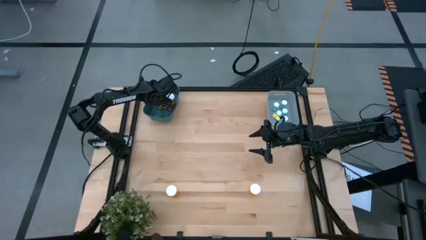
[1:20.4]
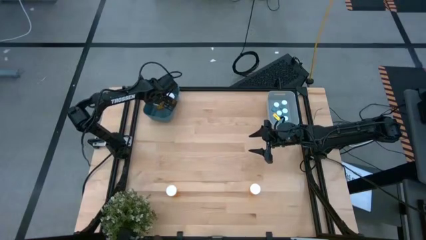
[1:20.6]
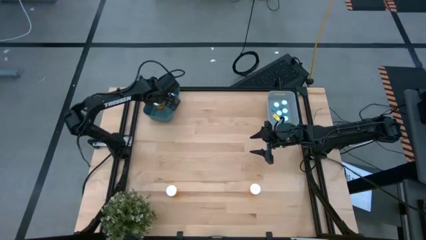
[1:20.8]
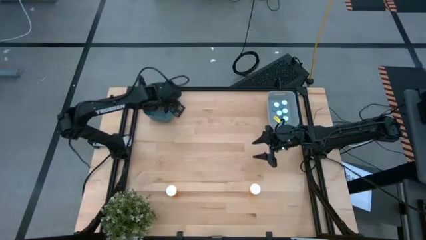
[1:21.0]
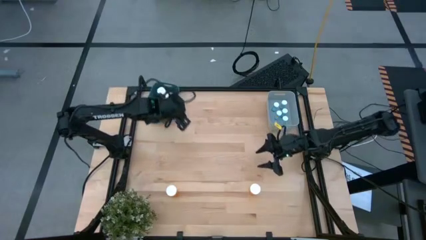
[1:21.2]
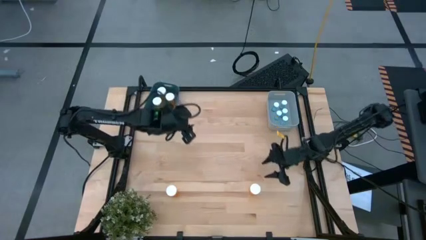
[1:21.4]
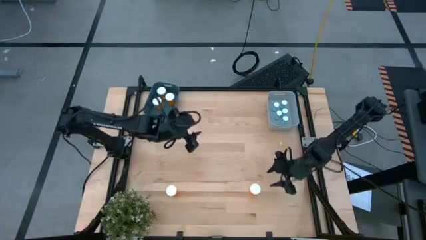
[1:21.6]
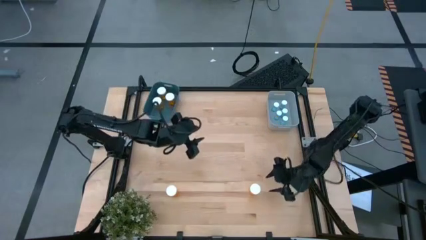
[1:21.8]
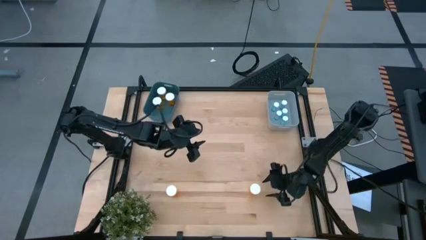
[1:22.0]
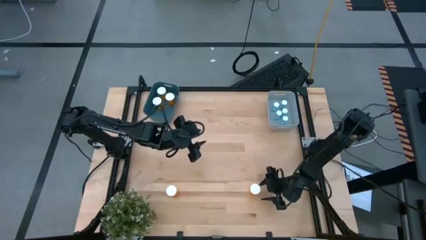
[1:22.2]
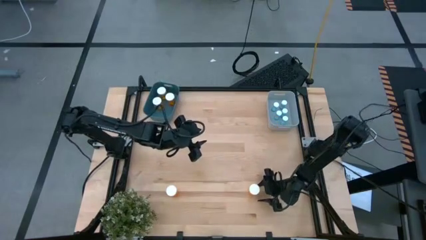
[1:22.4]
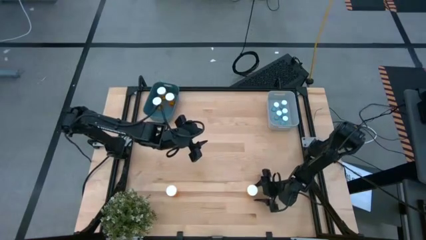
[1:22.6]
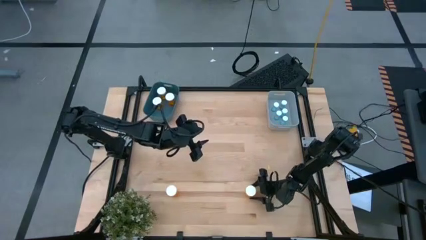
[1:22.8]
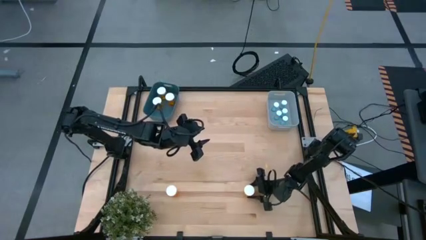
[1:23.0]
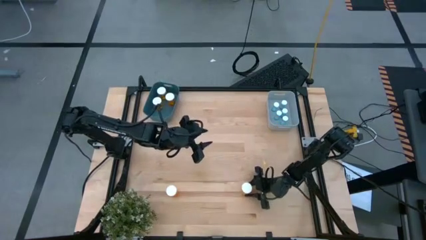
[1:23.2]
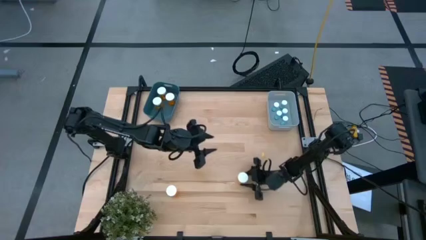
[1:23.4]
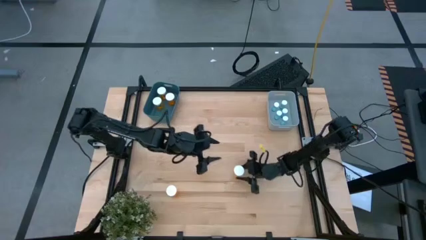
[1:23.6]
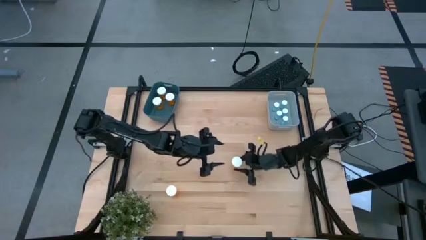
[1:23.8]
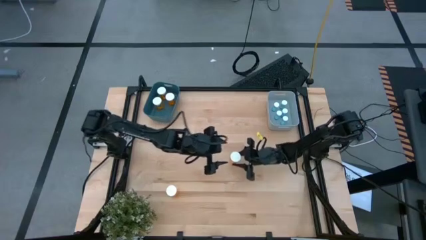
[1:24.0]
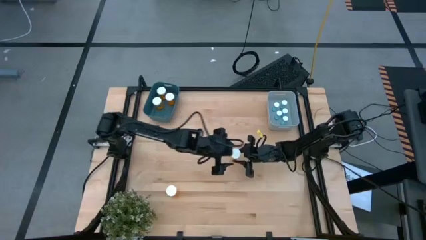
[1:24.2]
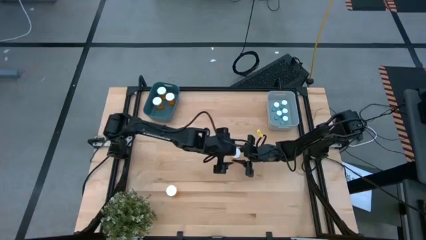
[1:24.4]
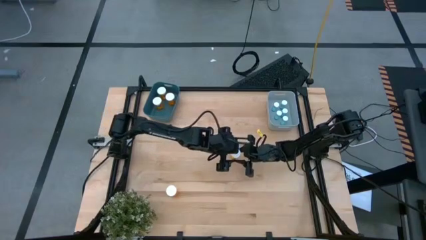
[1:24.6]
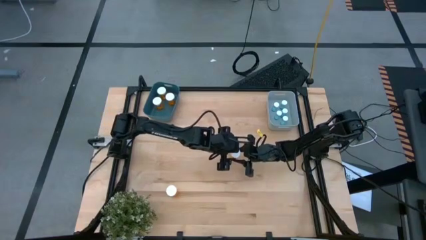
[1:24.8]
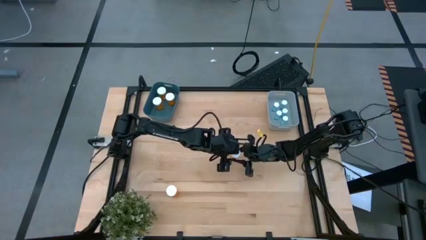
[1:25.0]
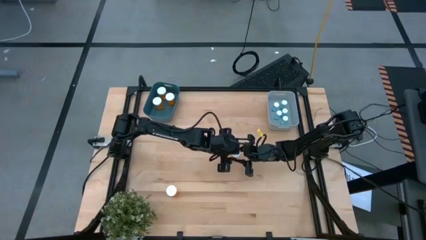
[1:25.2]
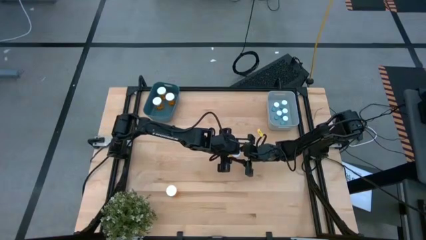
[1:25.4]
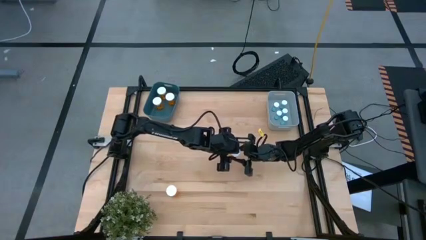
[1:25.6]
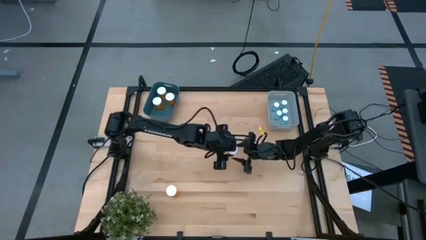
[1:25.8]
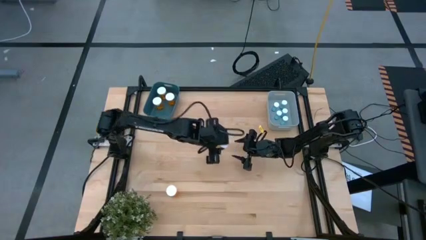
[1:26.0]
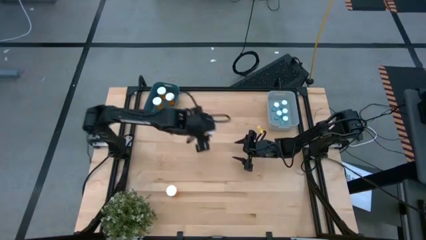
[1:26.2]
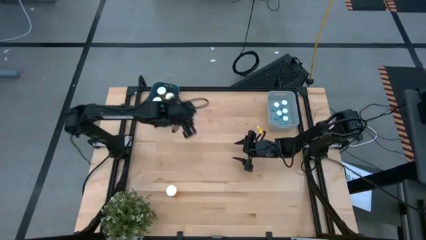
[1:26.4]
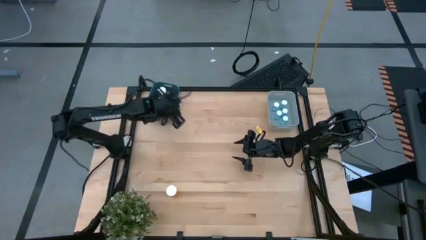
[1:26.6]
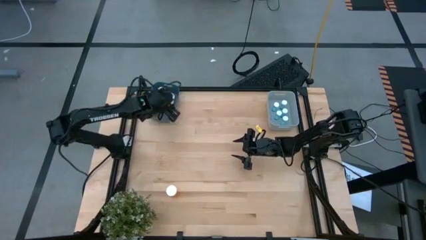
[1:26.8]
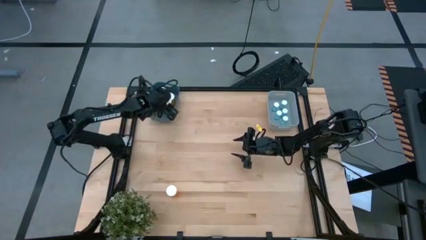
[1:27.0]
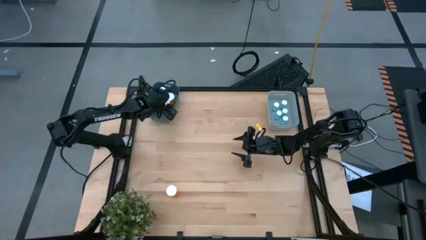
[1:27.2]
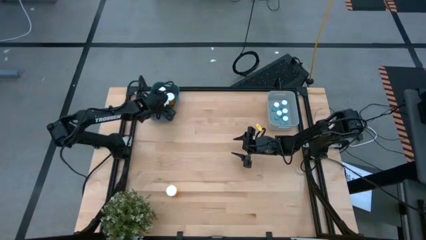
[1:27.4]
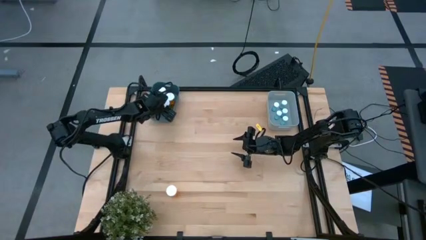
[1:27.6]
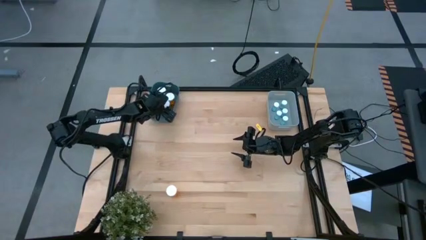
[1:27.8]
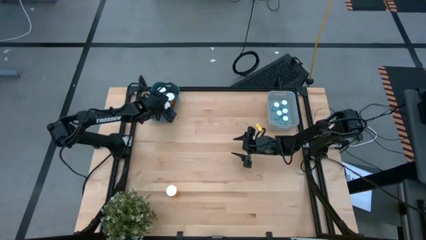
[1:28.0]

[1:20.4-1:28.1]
Task: Pick and place medicine bottles into bin by pill shape (circle, oval)
Put the orange capsule bottle into the blue bin

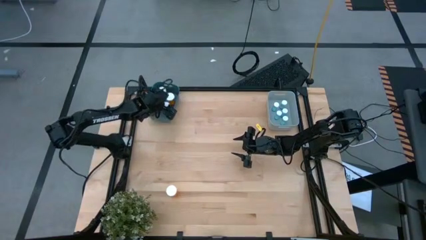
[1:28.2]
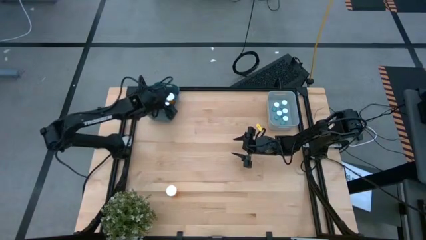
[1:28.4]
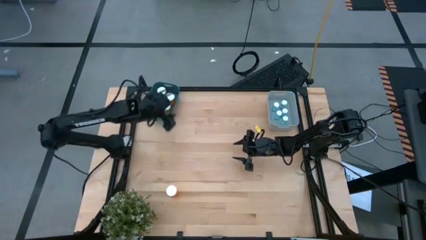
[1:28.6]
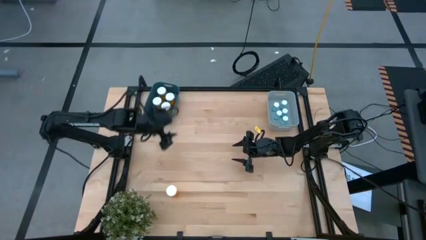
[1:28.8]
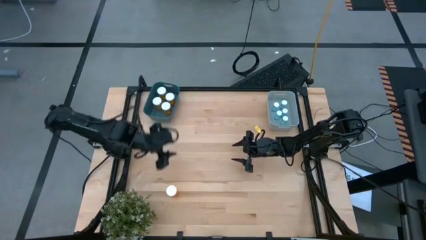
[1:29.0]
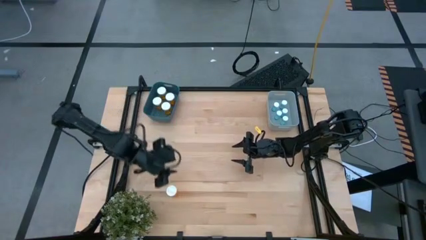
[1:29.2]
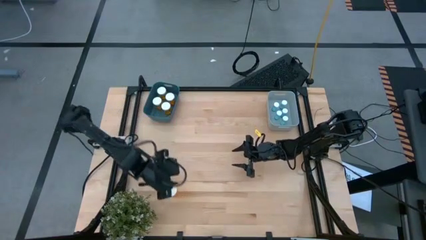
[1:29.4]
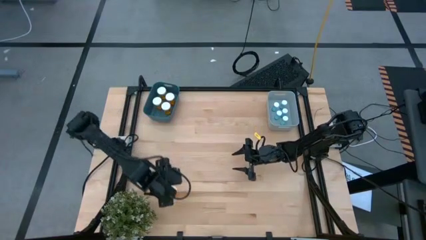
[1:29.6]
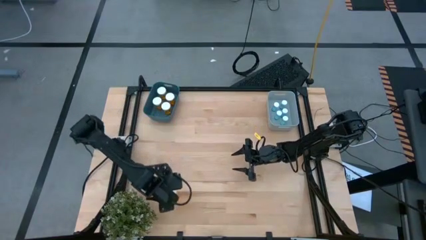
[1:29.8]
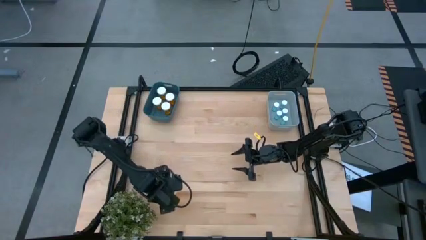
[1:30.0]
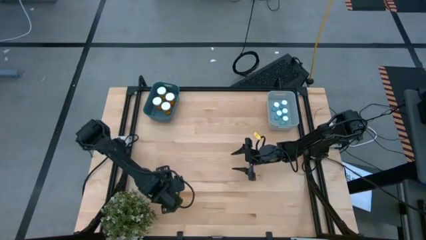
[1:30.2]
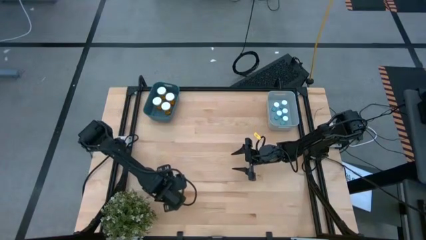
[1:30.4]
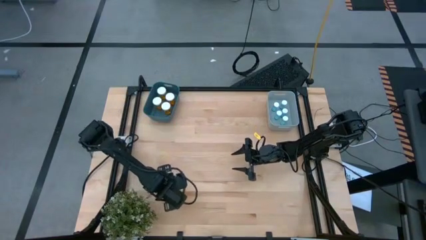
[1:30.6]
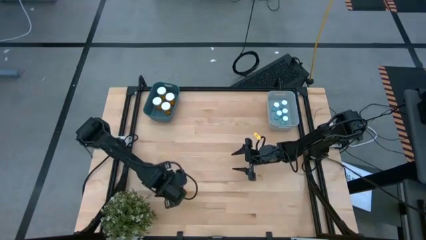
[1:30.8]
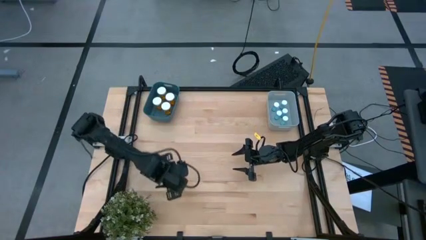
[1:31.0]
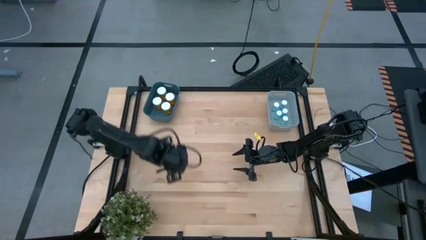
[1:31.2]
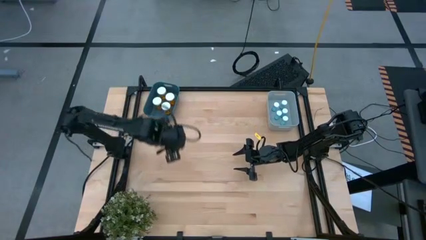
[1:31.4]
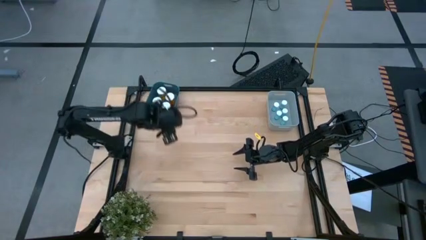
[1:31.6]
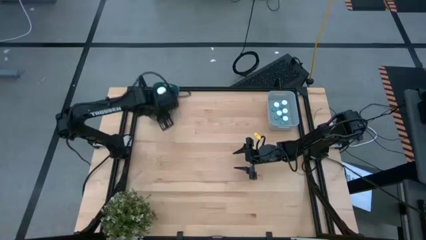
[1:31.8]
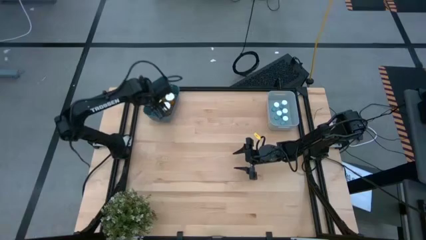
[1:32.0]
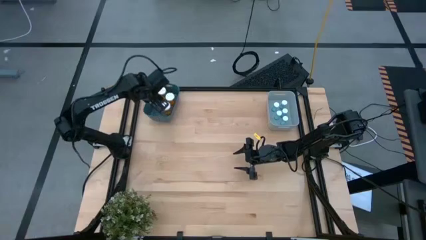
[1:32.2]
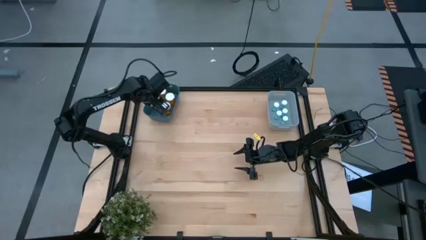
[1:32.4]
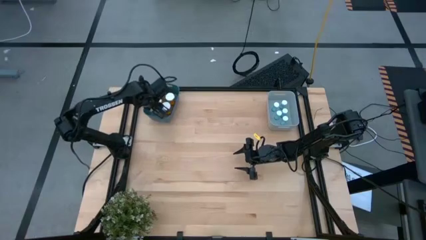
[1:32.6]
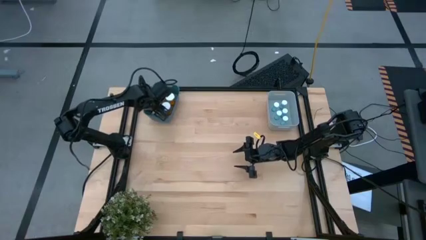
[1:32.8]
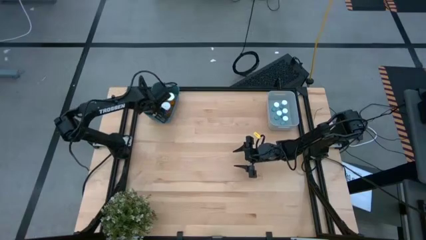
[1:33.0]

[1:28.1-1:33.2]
Put the orange capsule bottle into the blue bin

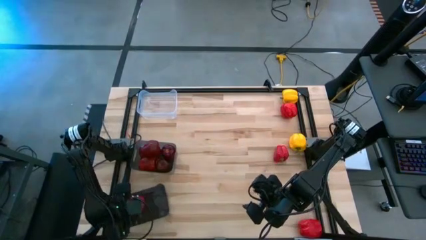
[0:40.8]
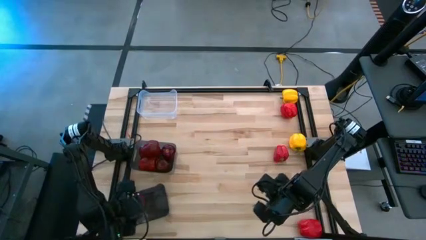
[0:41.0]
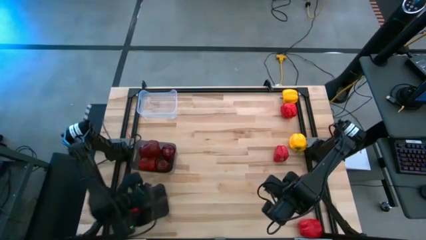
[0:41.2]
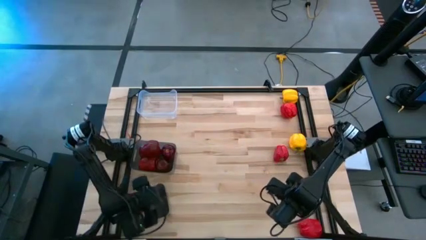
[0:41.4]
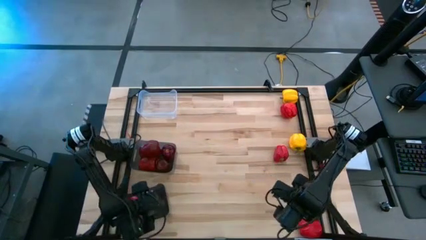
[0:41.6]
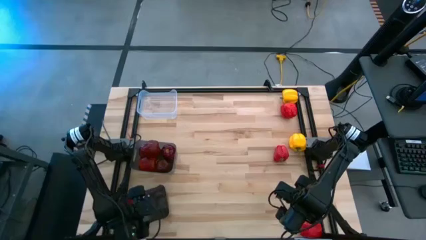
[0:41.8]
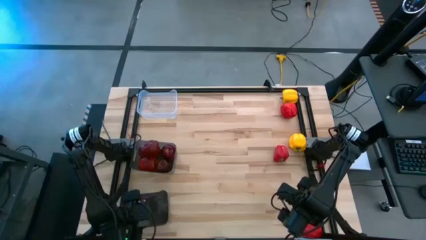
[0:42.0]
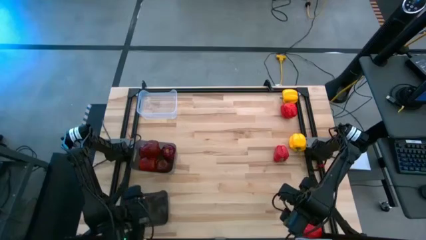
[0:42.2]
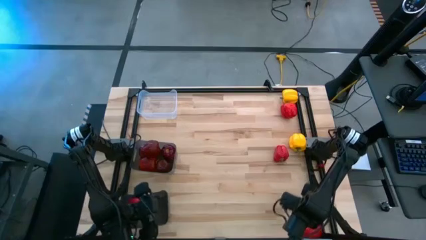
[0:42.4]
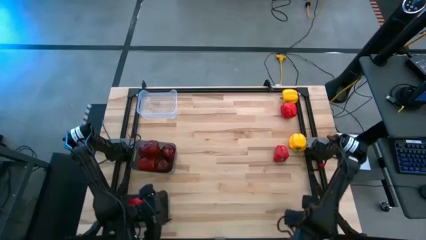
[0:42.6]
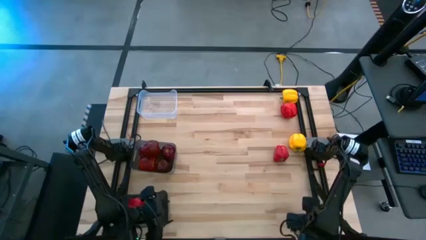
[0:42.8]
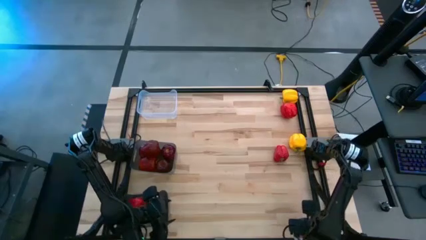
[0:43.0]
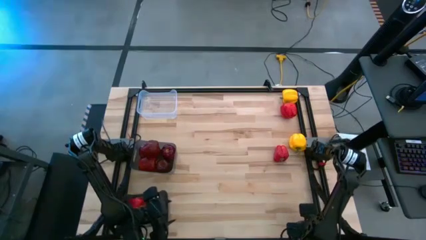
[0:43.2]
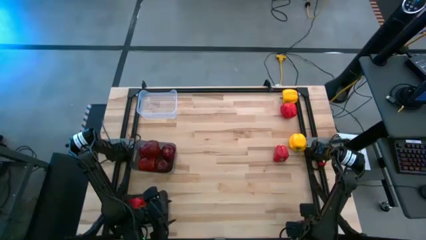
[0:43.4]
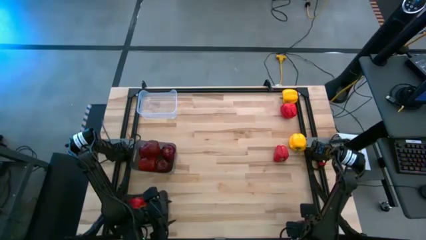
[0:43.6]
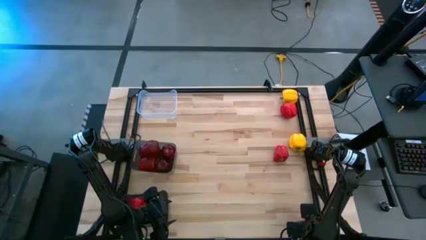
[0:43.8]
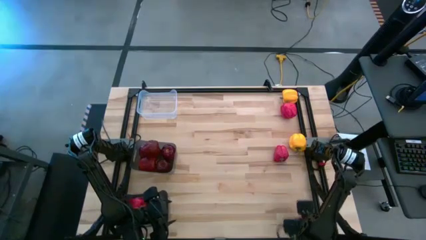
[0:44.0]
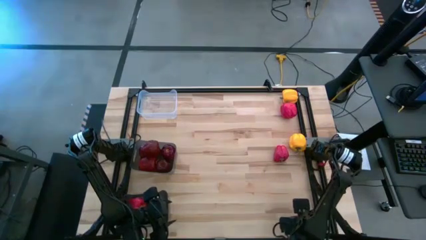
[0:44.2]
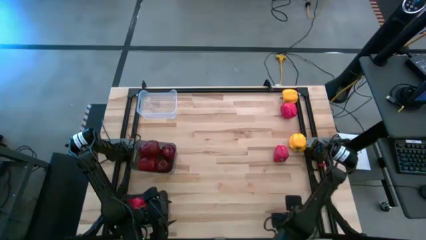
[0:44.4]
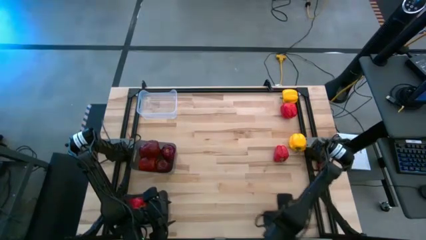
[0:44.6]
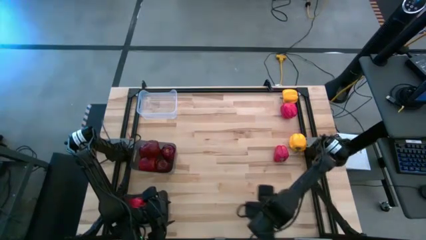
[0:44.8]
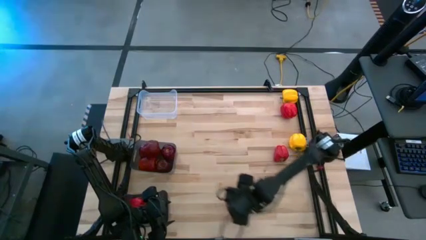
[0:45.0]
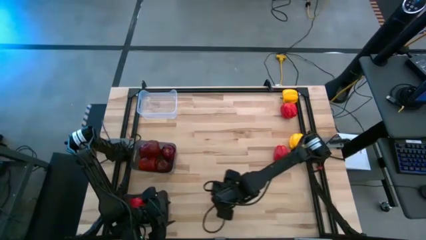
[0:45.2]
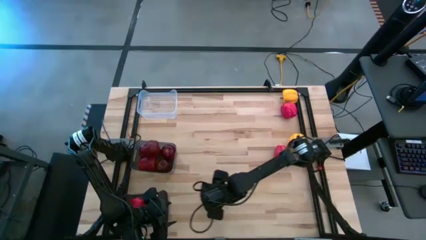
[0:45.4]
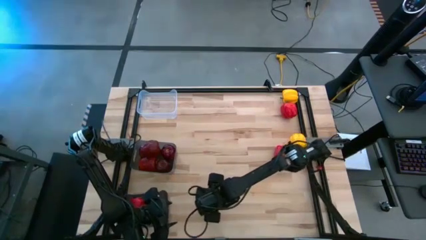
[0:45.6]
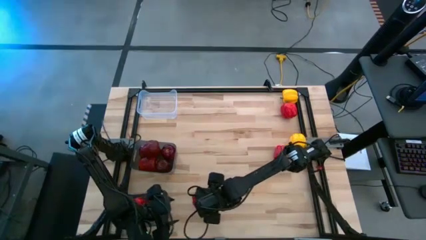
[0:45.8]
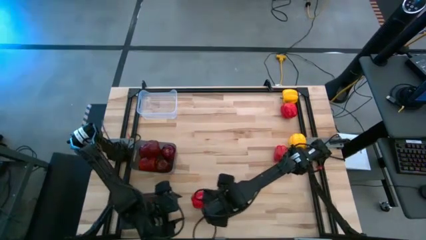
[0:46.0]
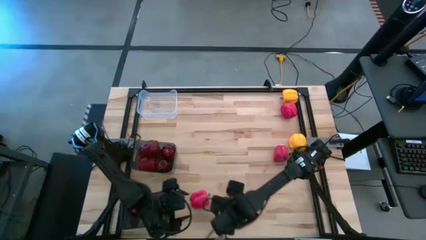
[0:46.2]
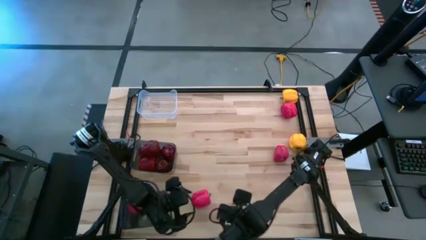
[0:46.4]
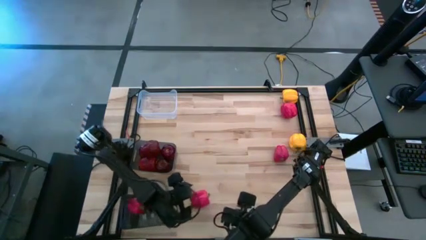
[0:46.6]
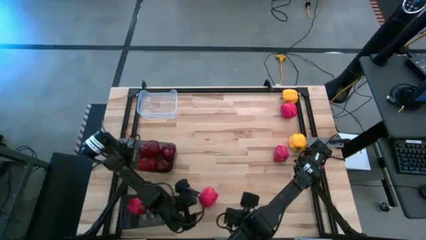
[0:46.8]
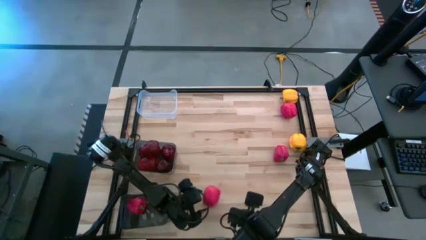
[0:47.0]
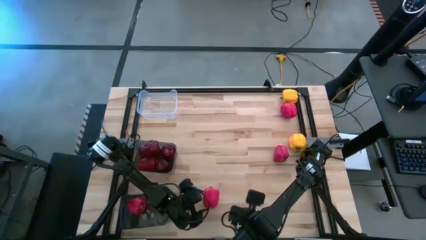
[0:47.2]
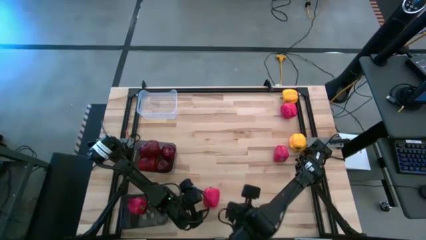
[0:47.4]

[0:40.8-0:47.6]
Task: Sort produce into baskets
Put the red bell pepper into the bottom black bin
